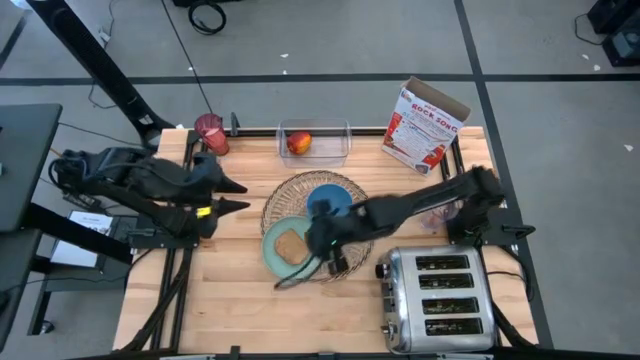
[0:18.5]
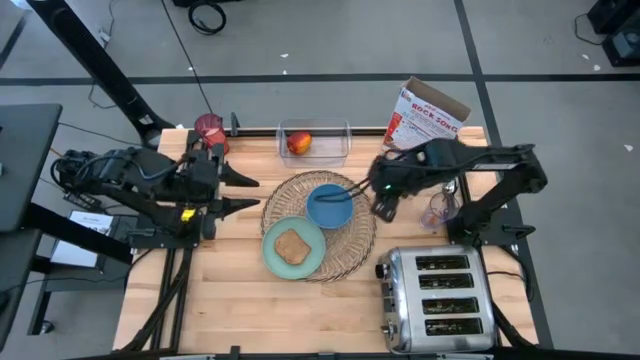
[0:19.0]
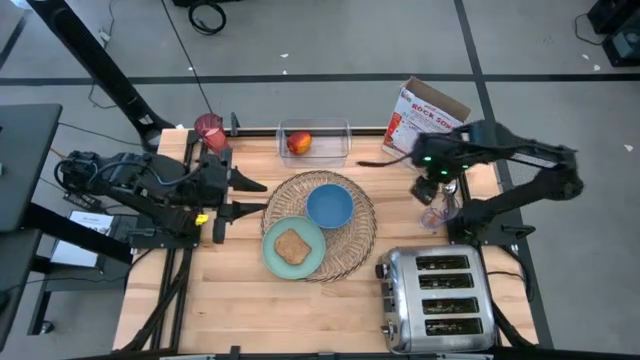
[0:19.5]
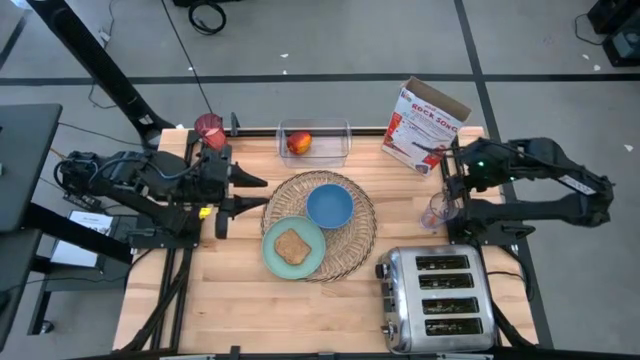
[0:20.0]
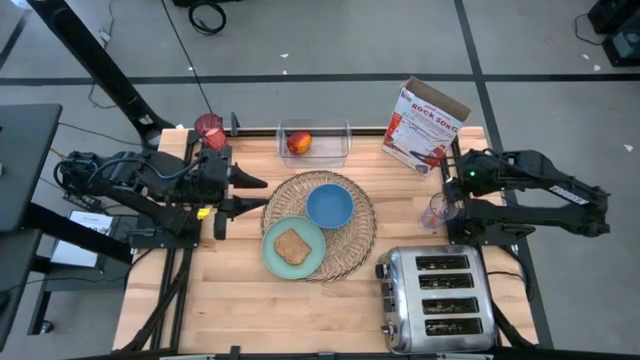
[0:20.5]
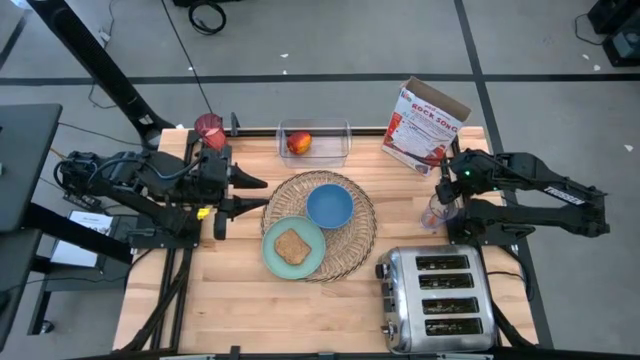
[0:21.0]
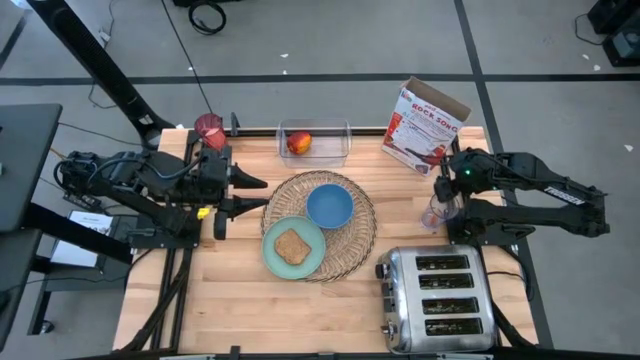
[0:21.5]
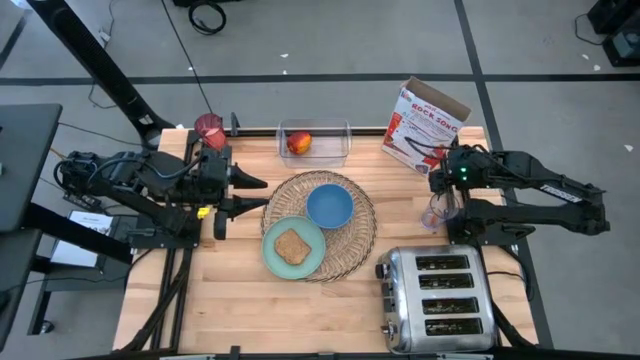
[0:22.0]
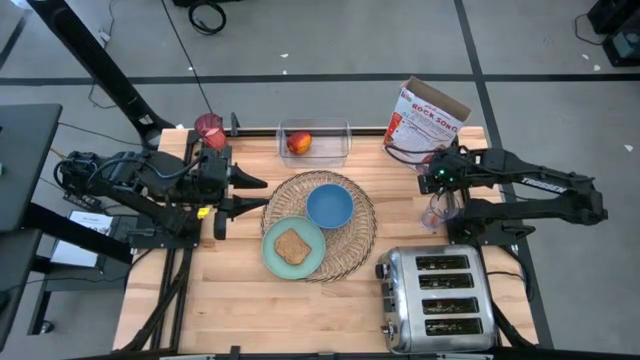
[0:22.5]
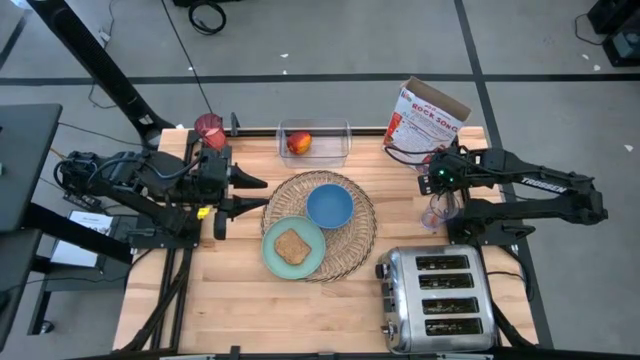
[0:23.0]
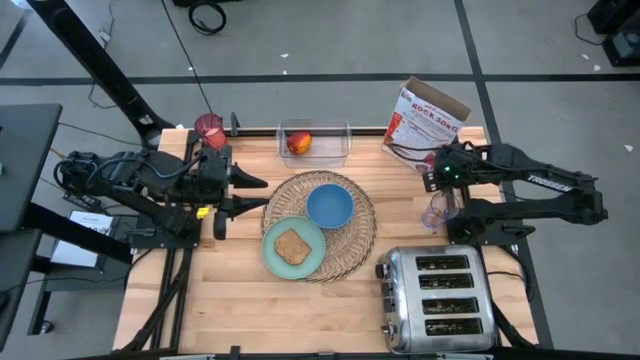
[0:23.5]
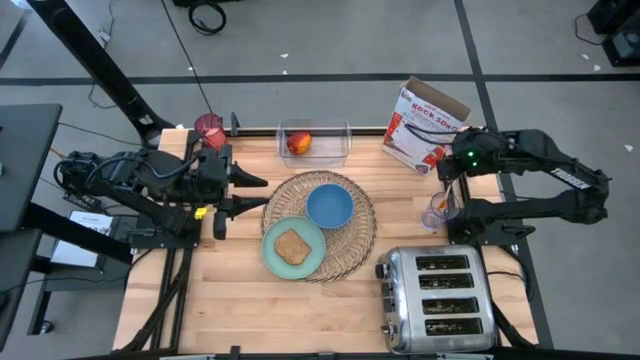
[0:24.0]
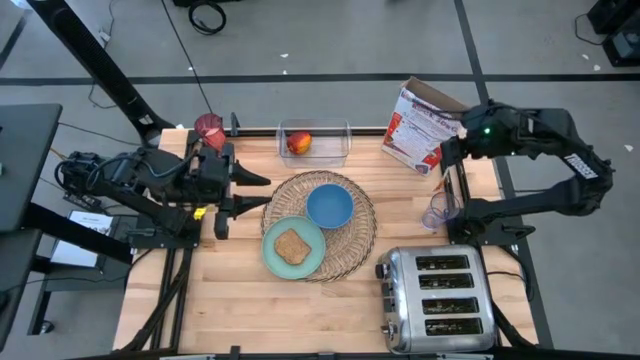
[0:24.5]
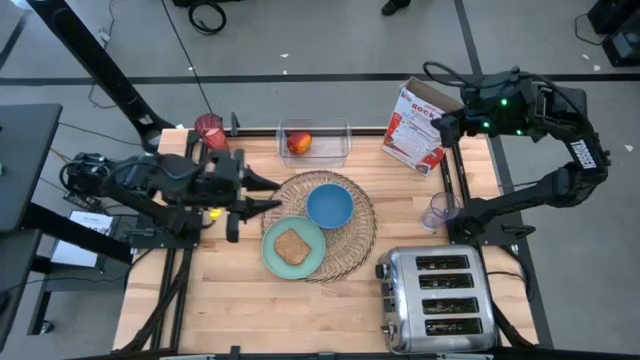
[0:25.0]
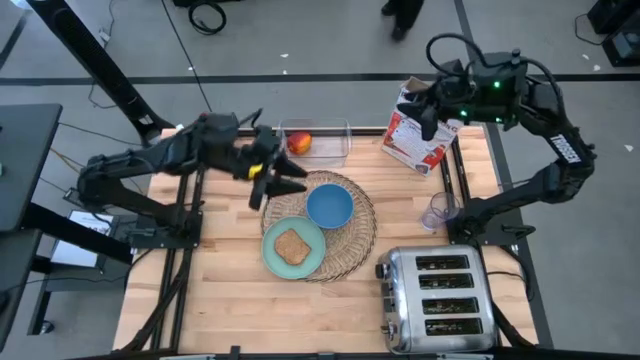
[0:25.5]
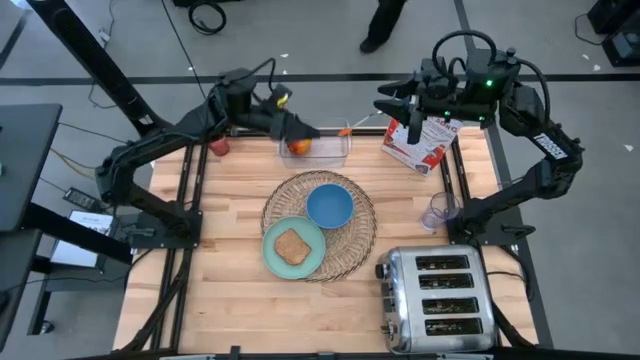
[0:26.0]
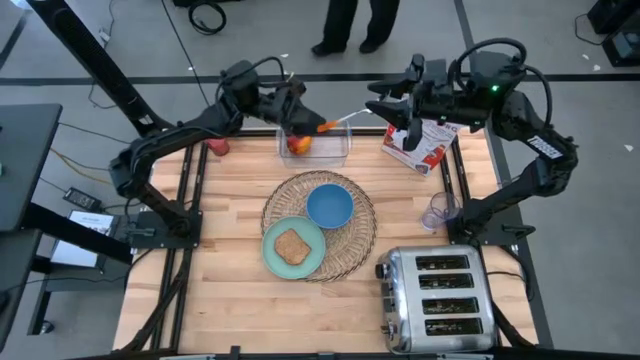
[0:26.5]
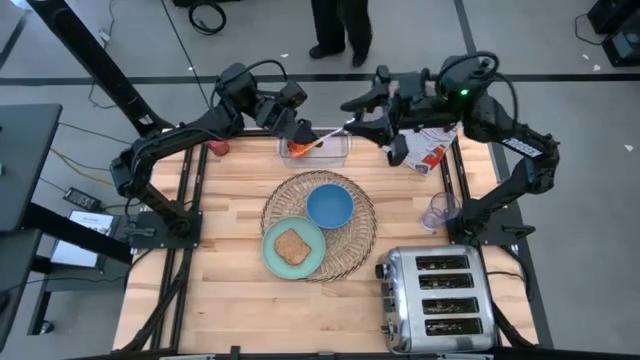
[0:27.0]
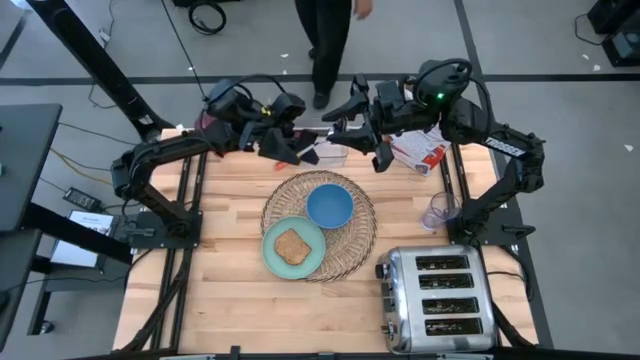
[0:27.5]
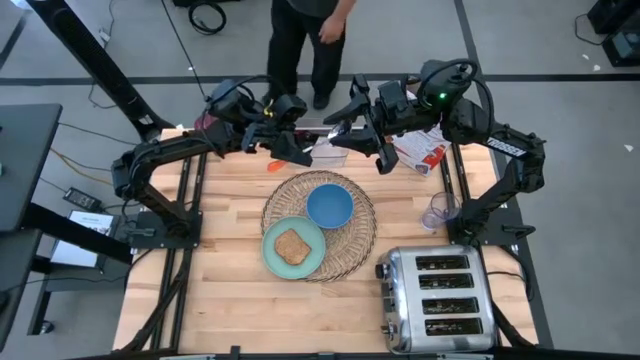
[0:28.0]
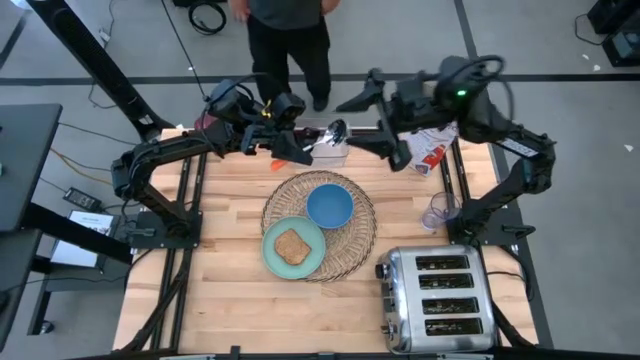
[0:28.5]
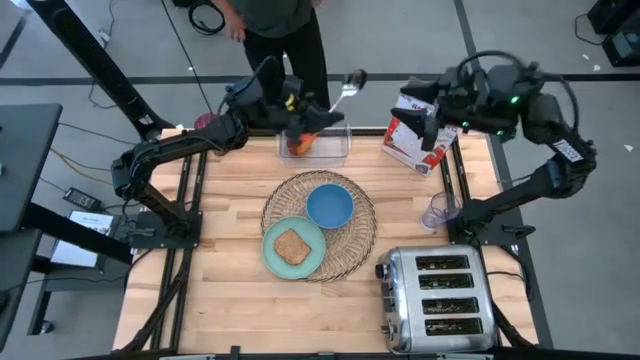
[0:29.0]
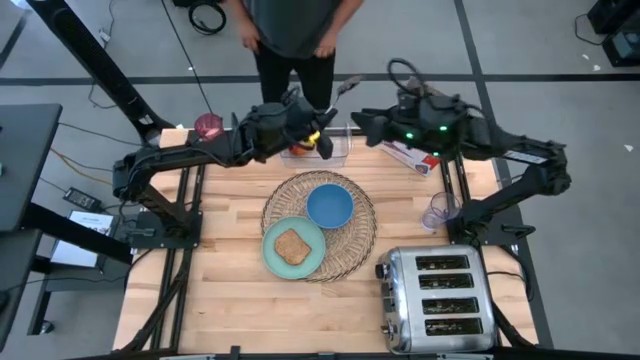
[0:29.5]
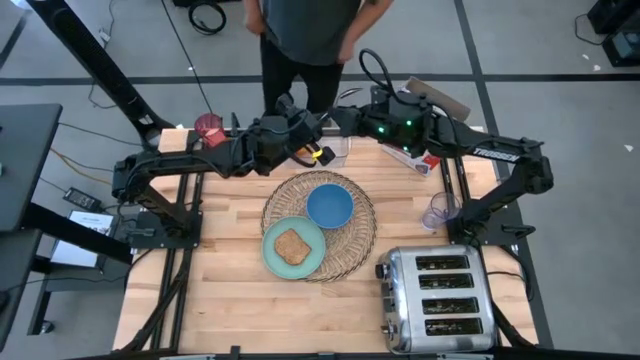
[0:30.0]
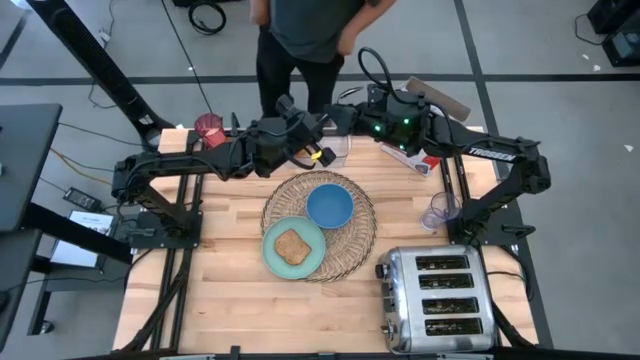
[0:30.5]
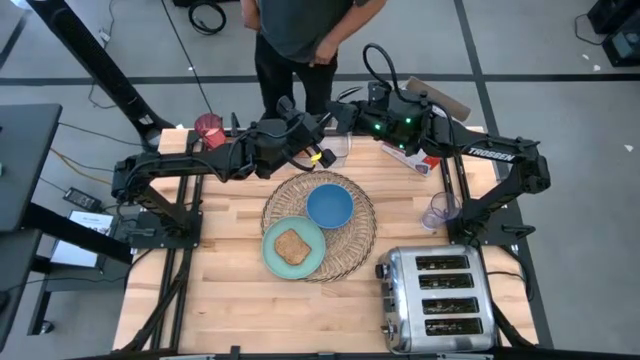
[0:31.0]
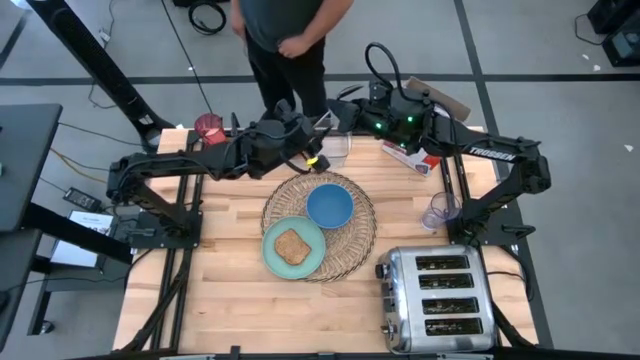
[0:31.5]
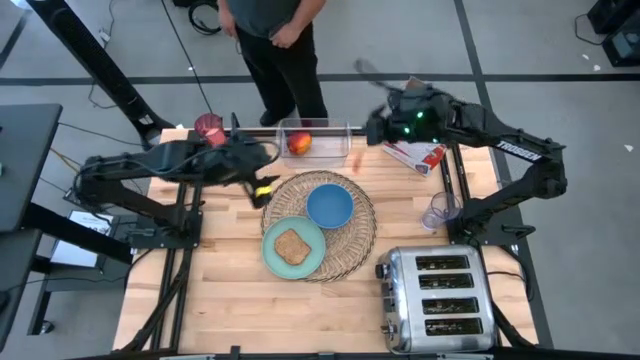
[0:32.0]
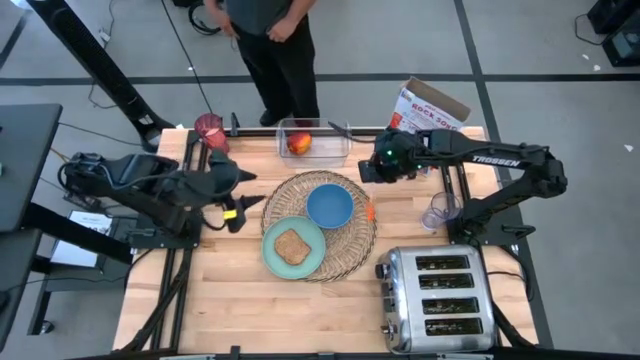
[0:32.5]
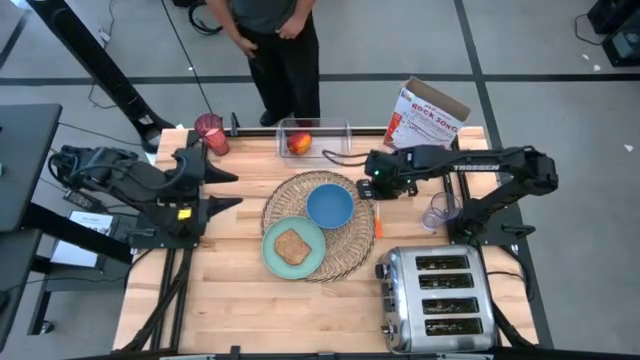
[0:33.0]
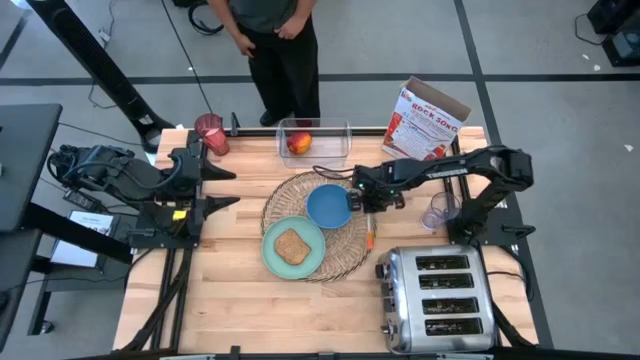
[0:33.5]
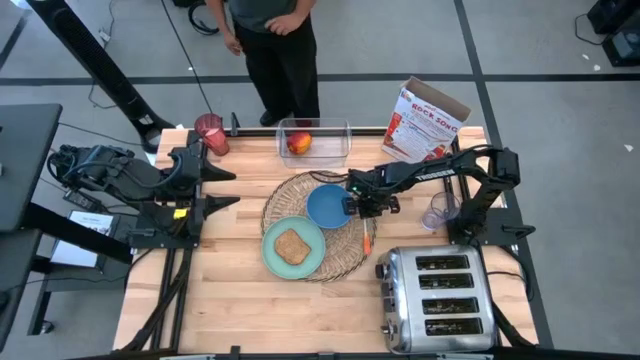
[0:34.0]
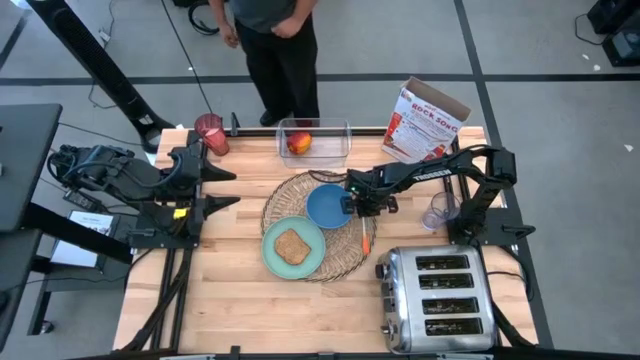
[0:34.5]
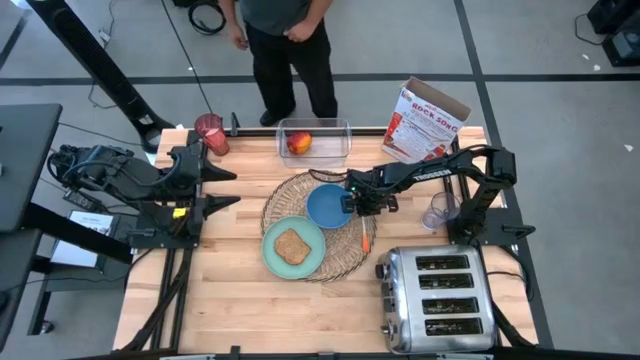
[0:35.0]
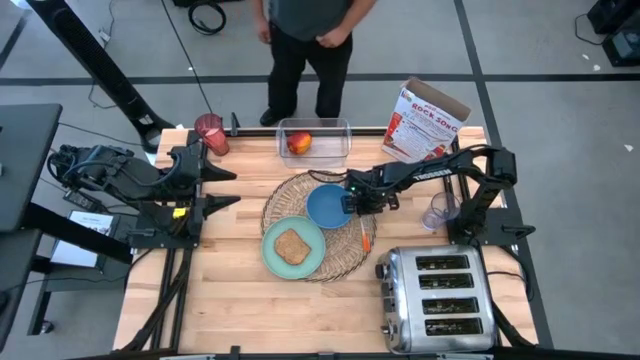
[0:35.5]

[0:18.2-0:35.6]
Task: Arrange a breakfast setting
Put the orange spoon on the table mat to the right of the blue bowl

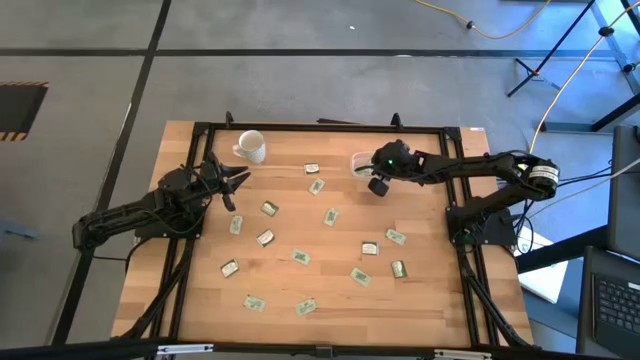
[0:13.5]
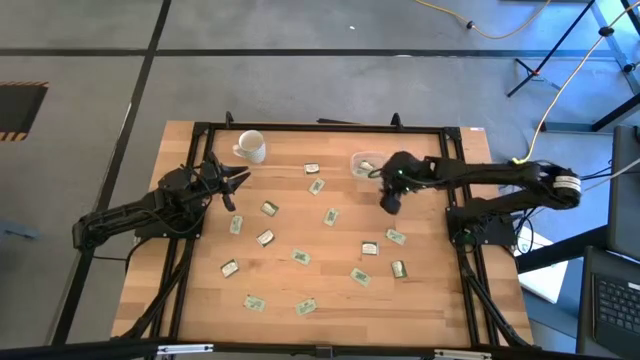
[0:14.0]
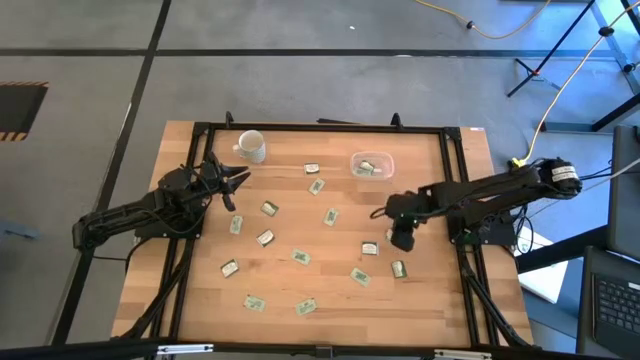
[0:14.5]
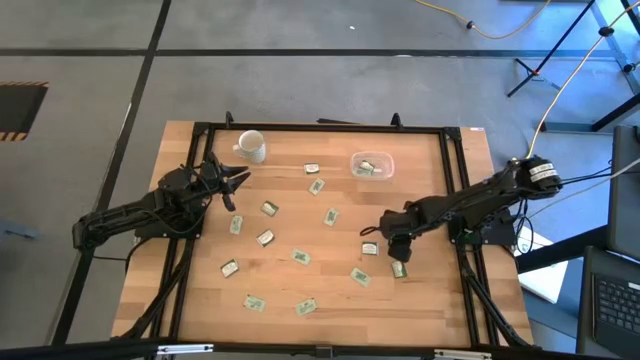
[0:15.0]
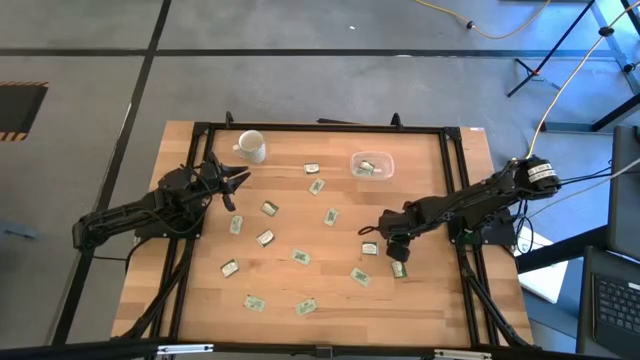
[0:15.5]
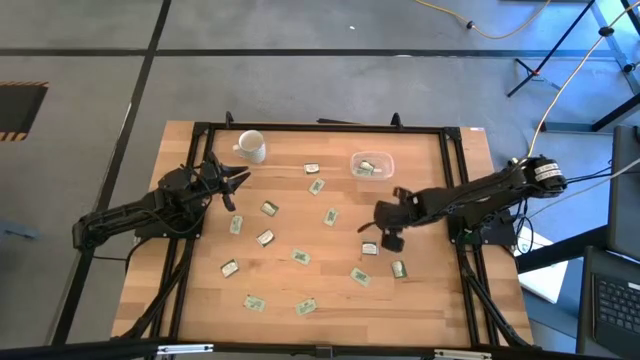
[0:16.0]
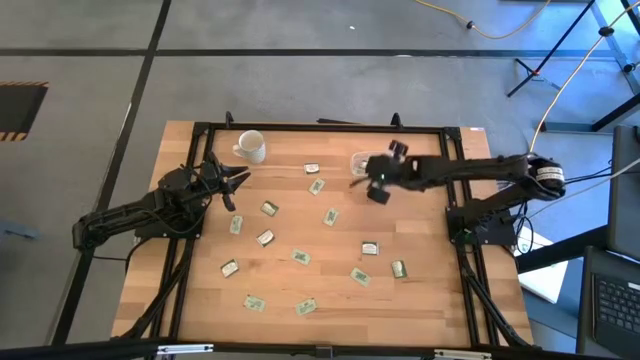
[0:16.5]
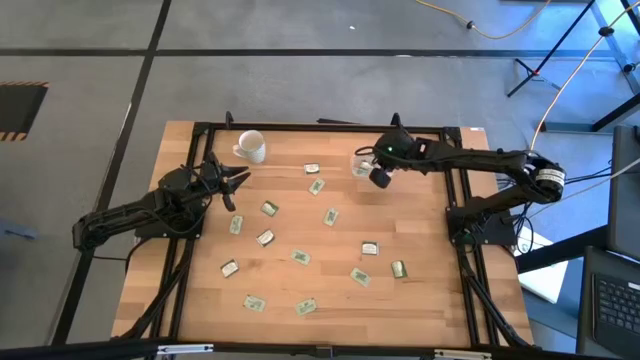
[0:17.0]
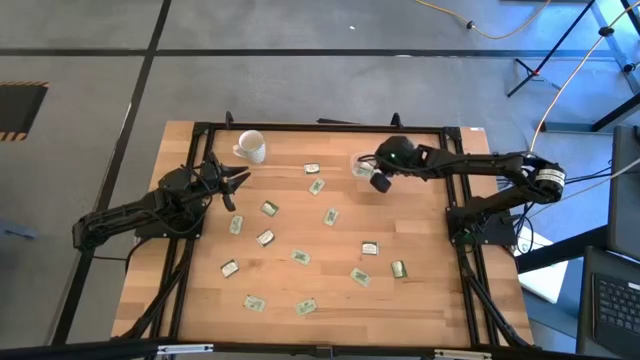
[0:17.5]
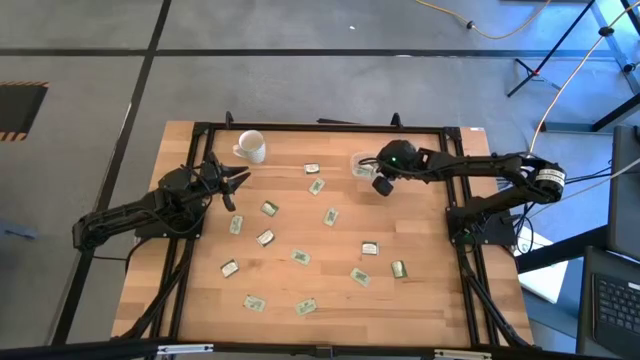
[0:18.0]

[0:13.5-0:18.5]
Task: Pick and place items into bin
Put the stevia packet into the transparent bin
